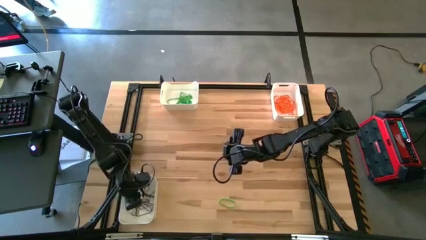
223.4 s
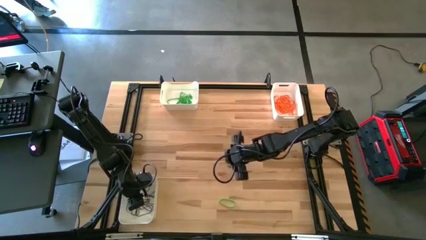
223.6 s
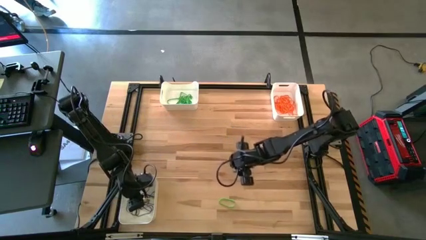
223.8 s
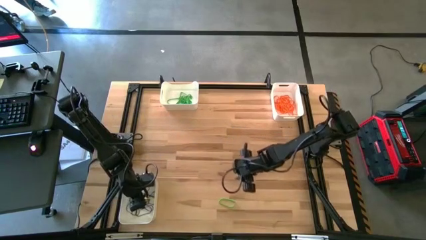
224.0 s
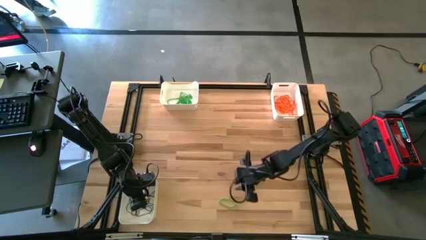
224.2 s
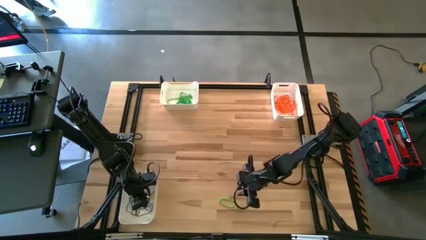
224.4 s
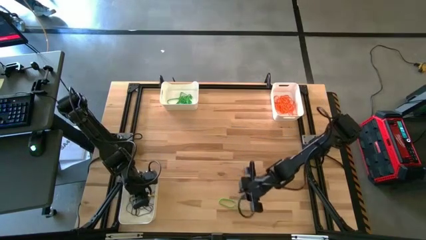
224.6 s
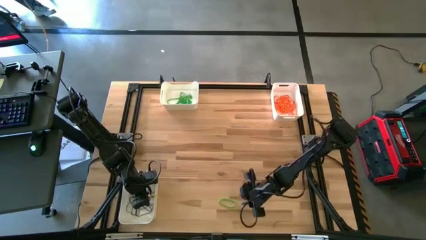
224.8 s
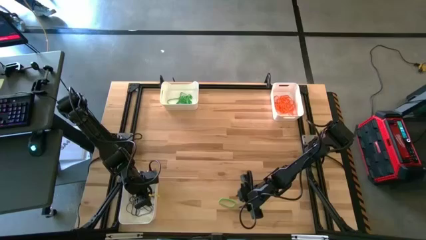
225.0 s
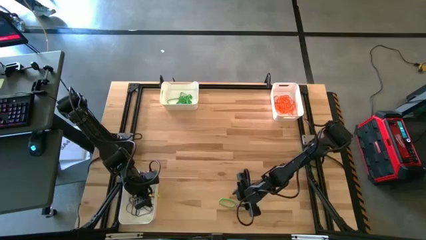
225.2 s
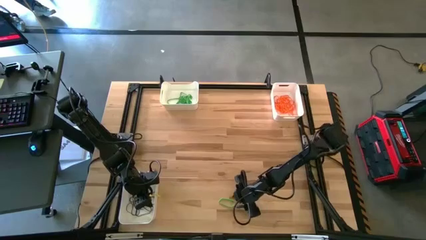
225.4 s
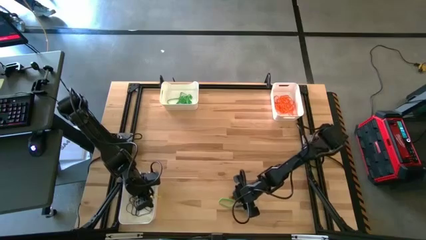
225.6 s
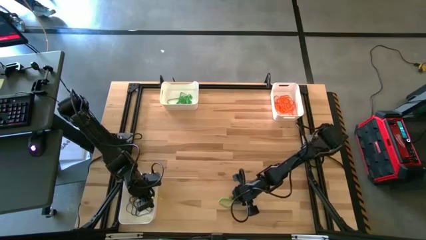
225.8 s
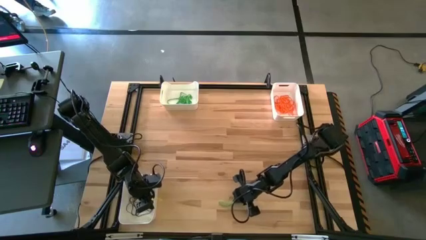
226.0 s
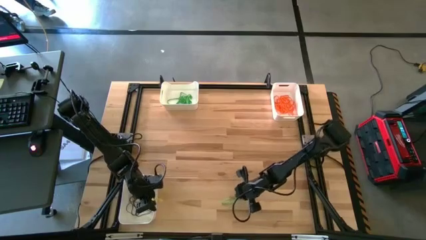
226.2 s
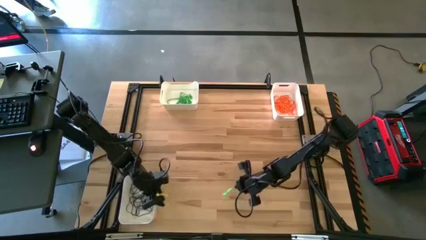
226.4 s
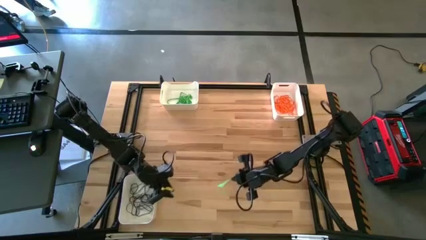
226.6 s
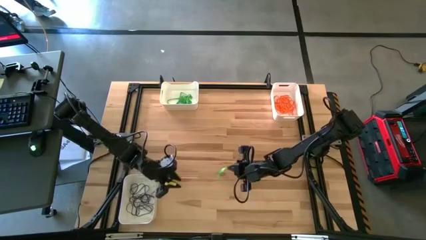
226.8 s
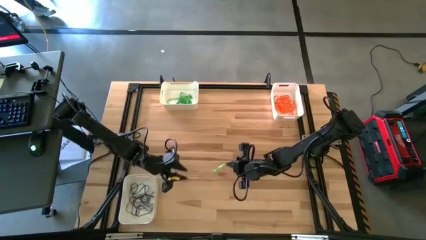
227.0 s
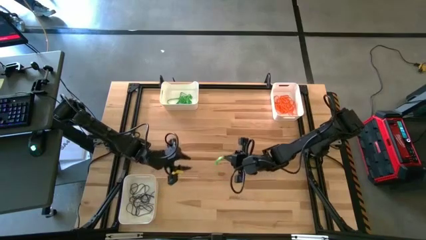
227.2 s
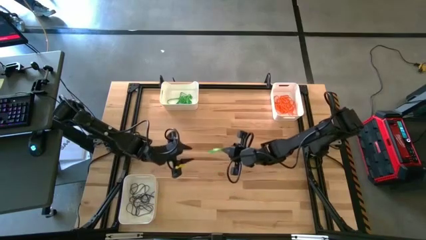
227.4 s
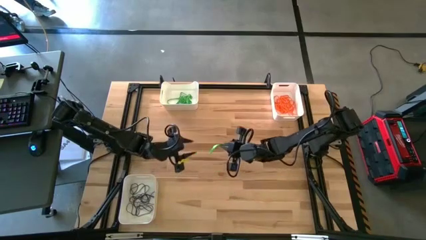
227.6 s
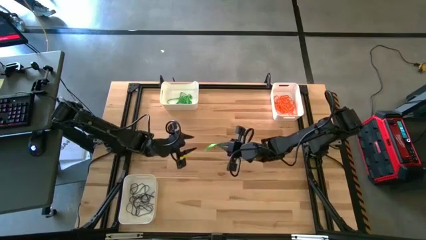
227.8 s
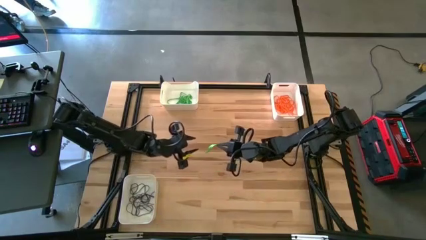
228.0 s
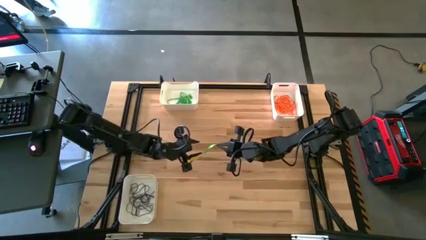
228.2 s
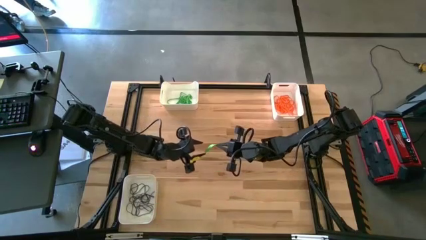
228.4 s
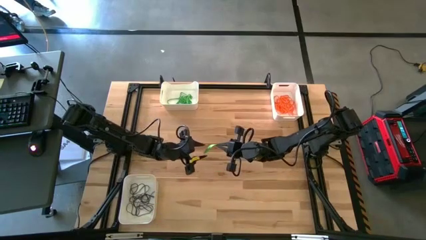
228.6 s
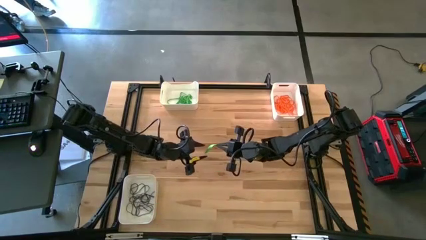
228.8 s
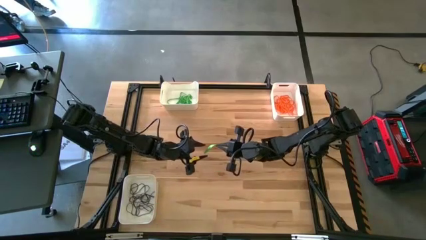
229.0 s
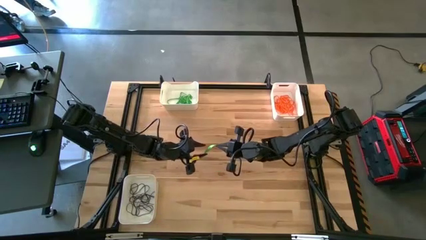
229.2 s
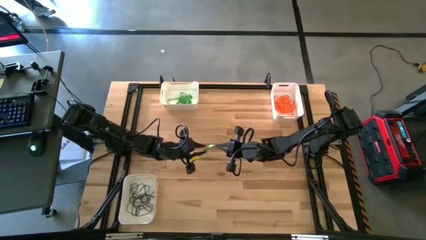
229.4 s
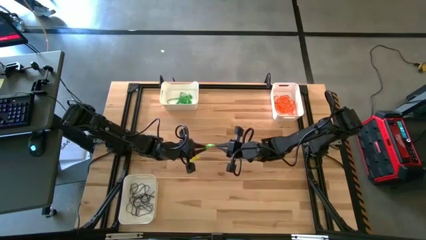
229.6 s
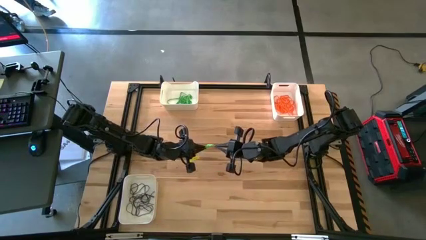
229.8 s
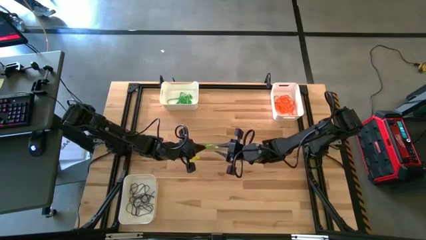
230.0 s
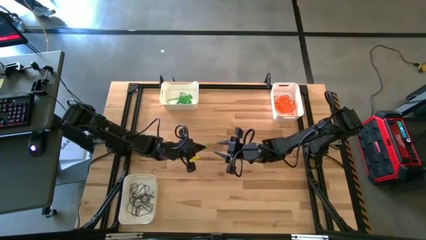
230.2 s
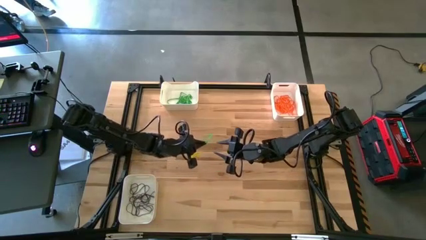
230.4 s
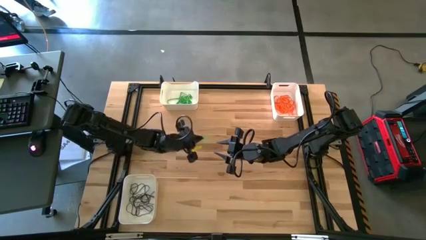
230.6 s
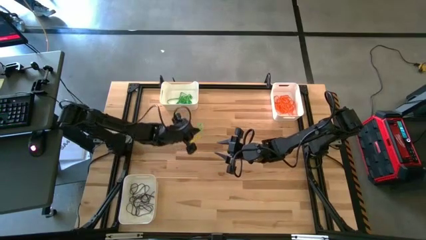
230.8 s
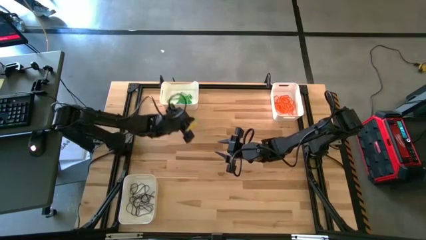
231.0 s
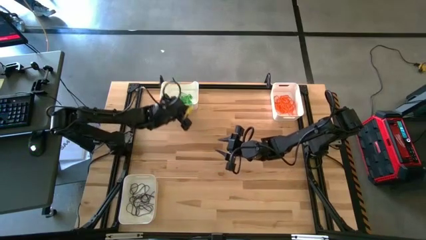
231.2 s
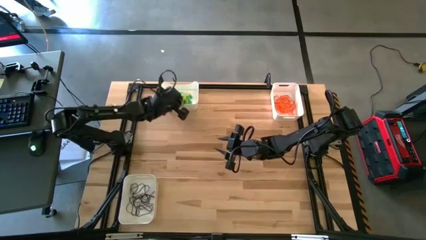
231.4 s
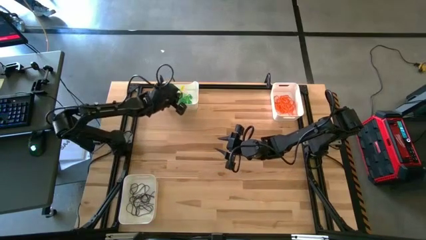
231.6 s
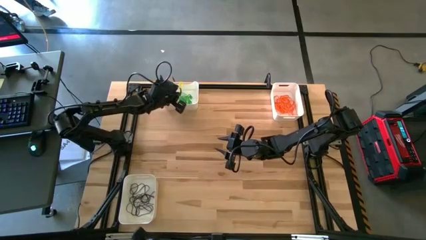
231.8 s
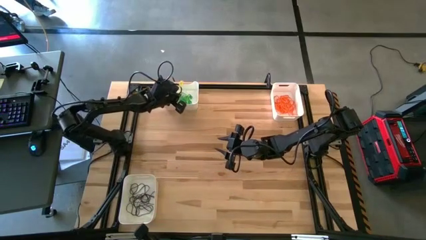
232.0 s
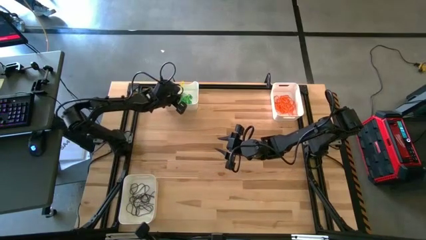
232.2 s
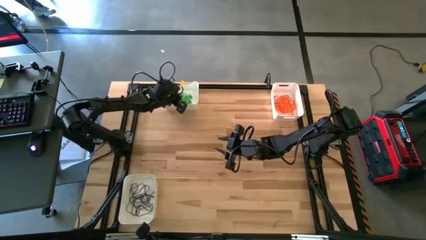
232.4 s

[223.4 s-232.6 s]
Task: Sort rubber bands into baskets
Put the green rubber band into the top left white bin

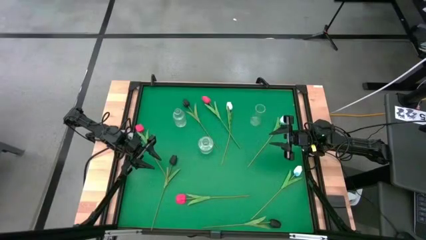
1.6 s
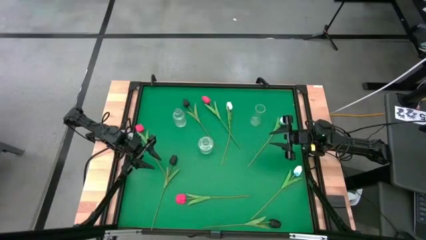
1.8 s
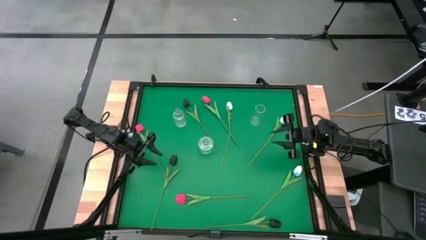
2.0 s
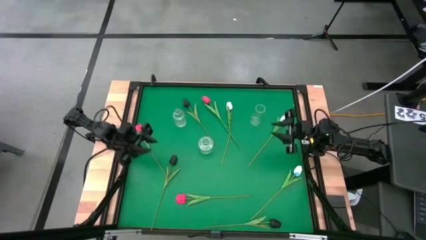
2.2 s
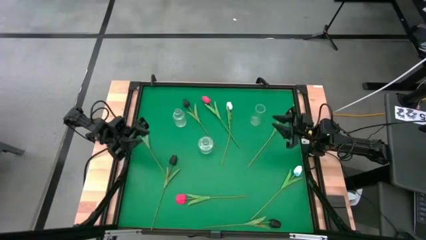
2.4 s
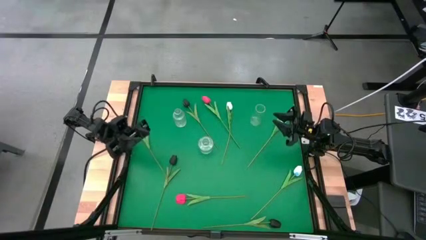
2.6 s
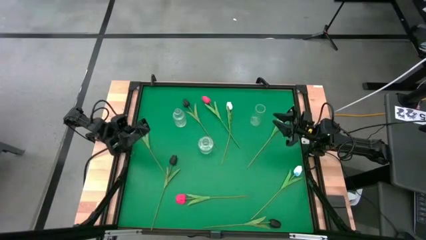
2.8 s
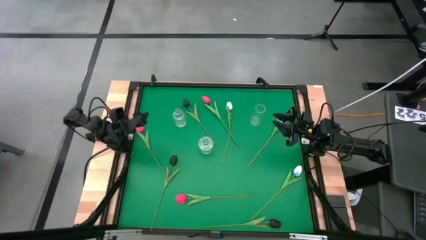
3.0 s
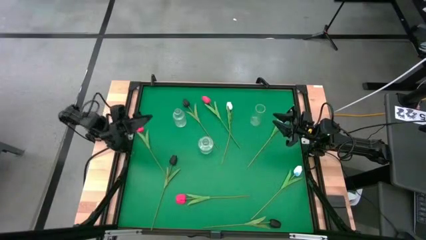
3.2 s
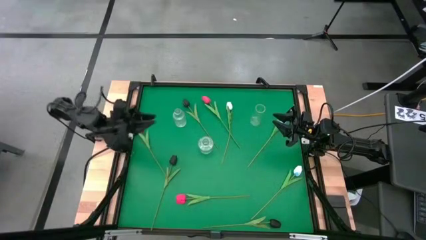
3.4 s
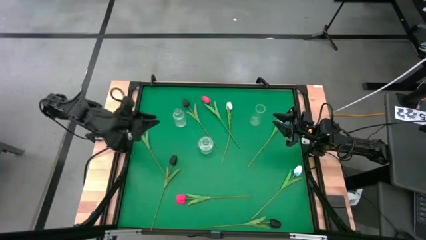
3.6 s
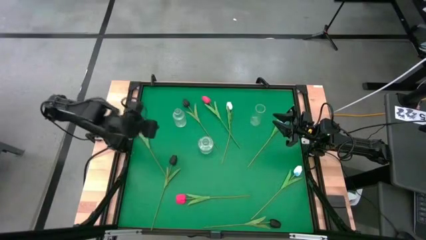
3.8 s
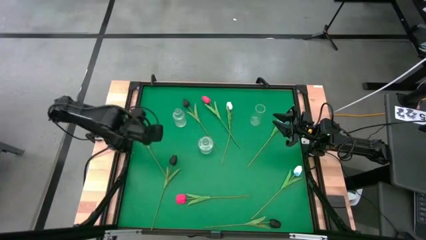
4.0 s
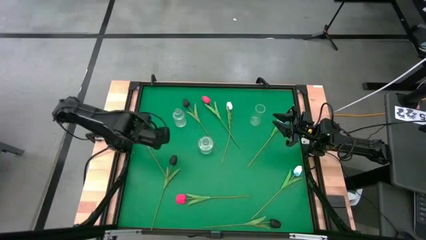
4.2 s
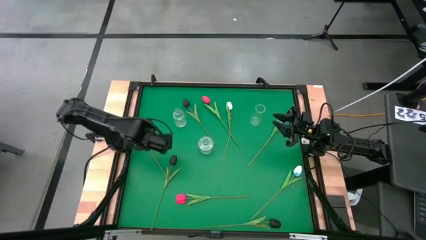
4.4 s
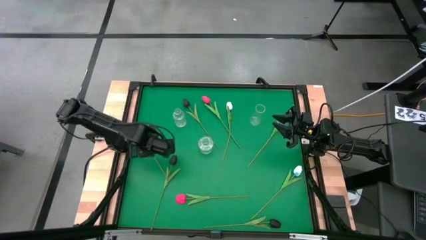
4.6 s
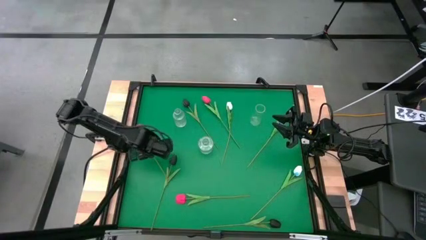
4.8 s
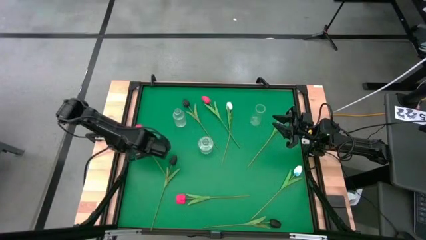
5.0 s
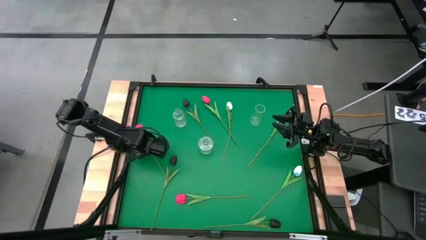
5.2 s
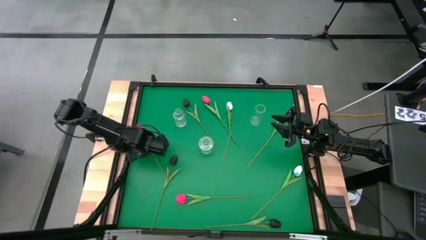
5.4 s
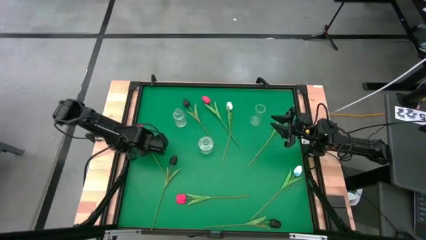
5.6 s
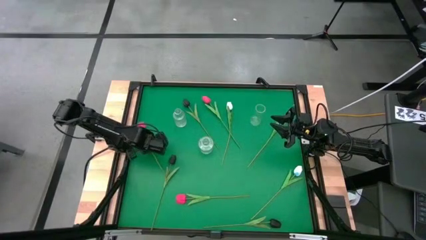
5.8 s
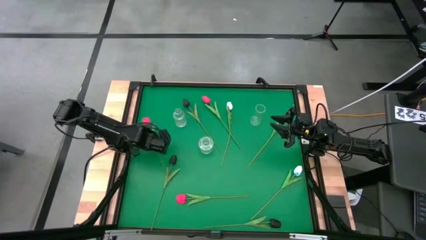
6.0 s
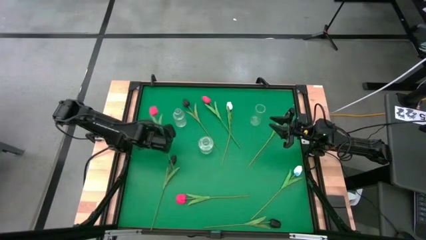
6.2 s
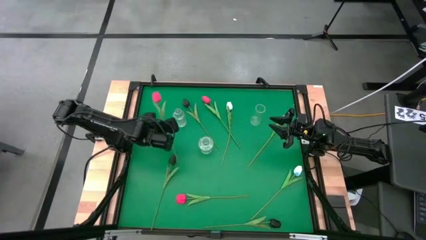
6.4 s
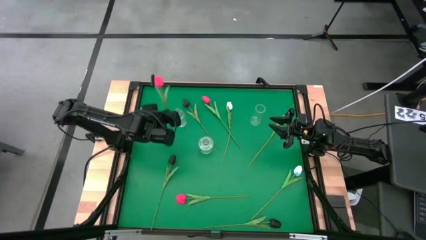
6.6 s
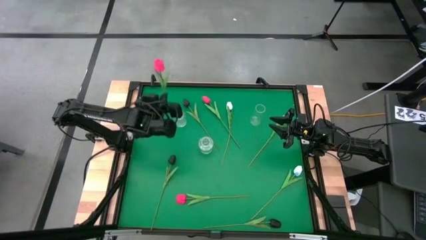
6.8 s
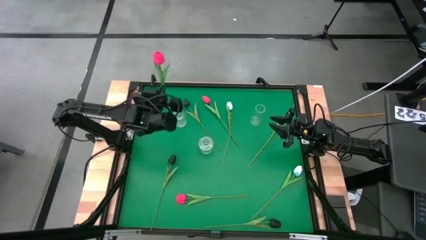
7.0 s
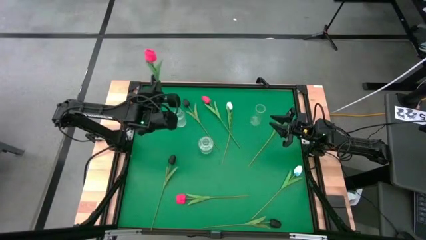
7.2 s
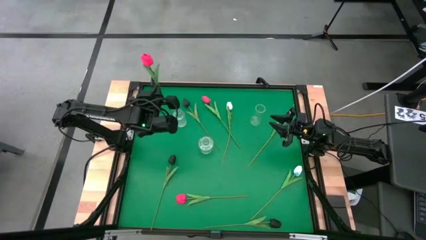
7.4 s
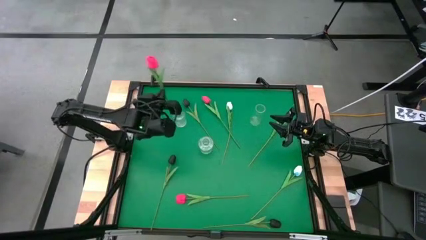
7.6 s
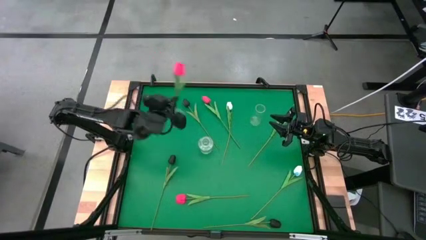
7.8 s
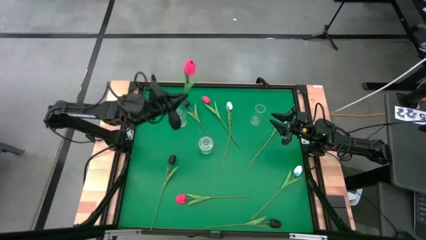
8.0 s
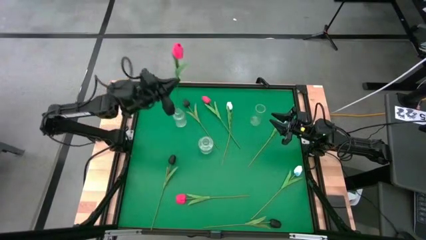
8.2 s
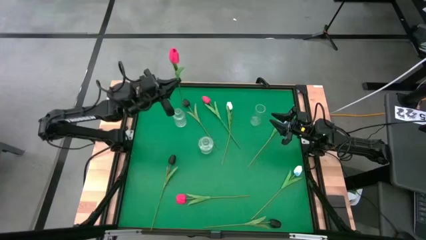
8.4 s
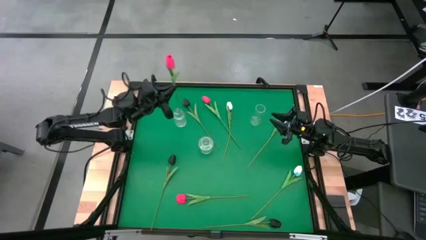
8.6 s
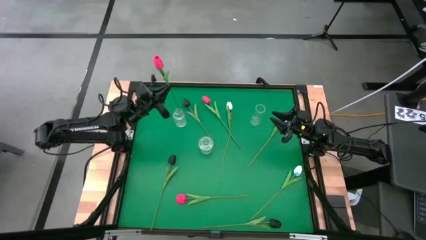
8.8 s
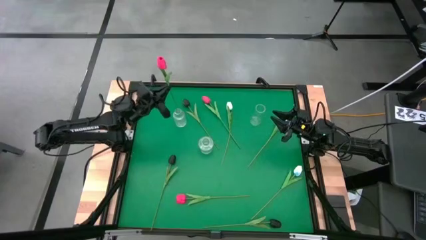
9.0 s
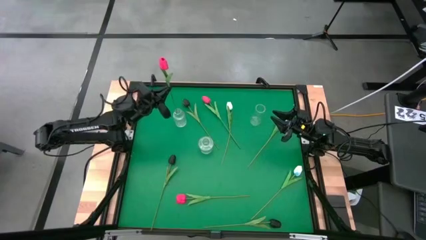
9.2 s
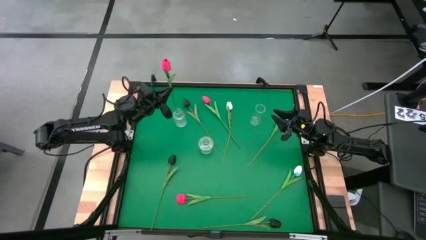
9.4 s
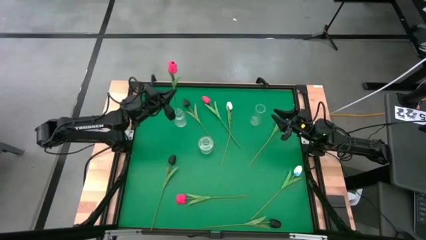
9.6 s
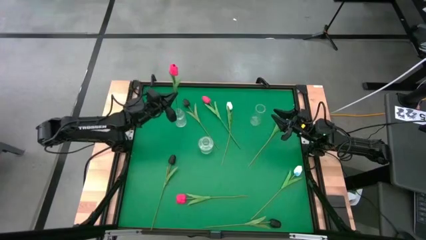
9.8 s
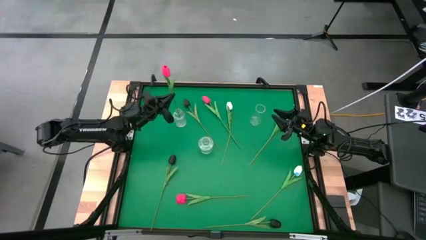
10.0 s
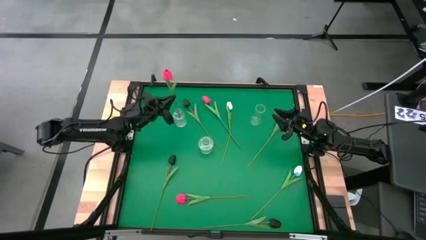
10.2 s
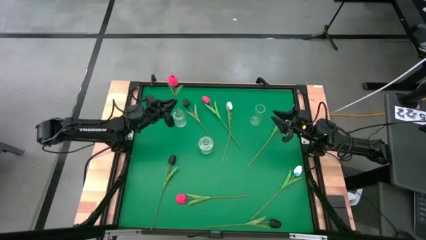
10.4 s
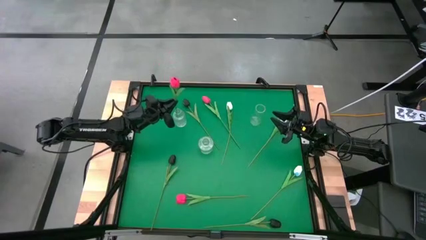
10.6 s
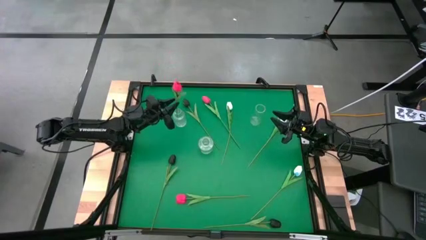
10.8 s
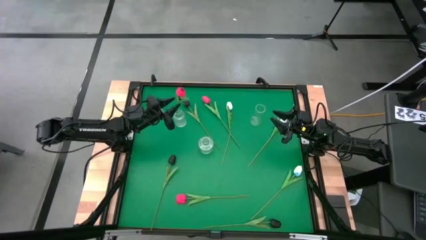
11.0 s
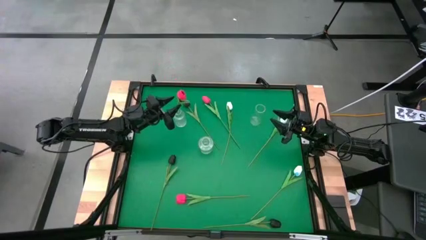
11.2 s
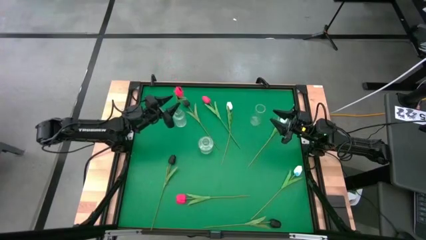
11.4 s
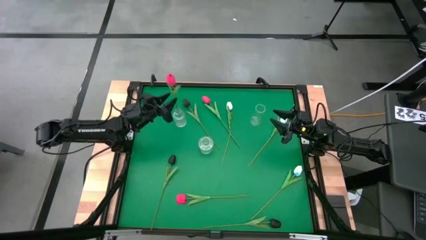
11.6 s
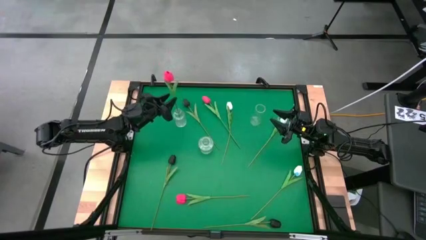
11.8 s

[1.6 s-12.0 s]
Task: Sort flowers into vase by color
Put the middle pink tulip into the top left transparent vase
